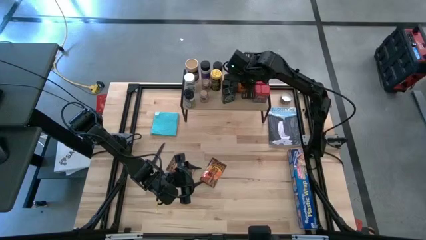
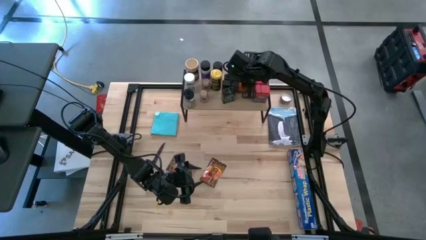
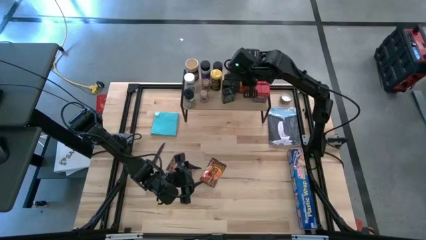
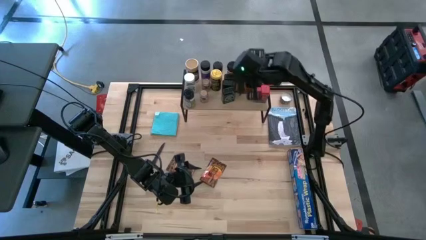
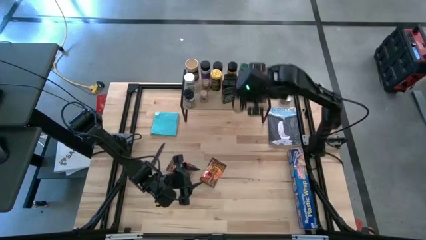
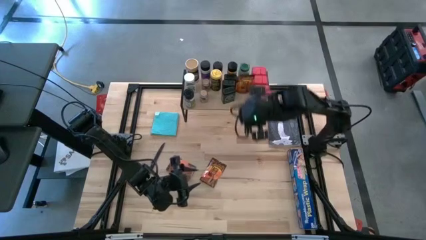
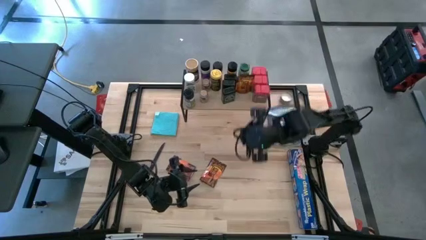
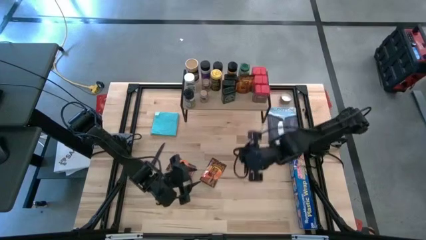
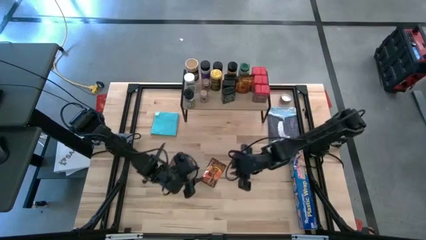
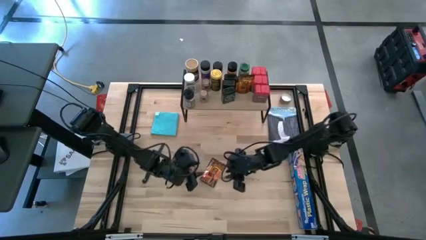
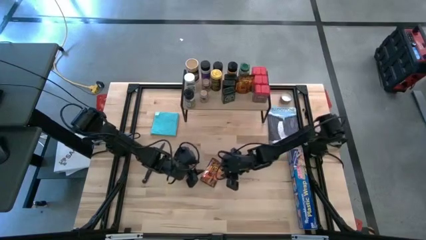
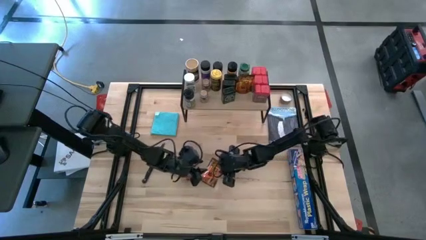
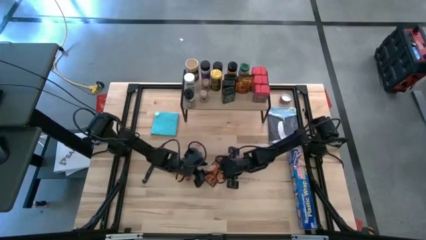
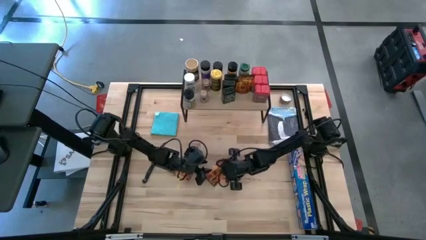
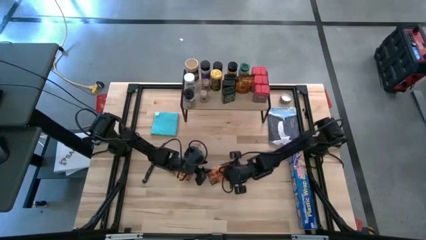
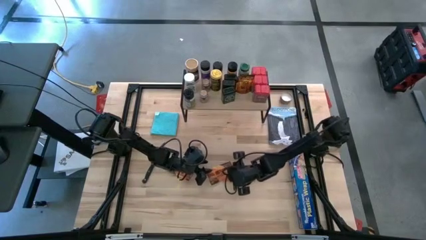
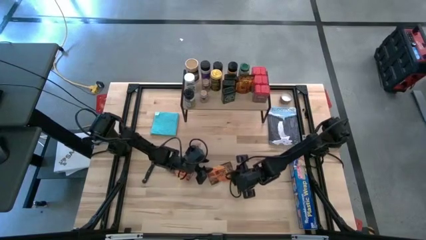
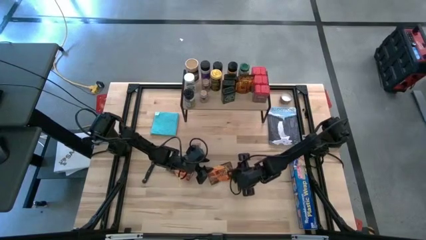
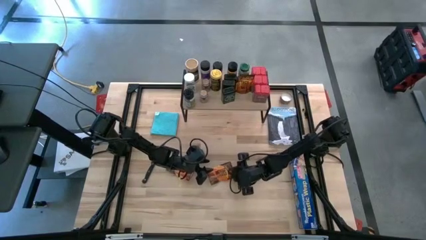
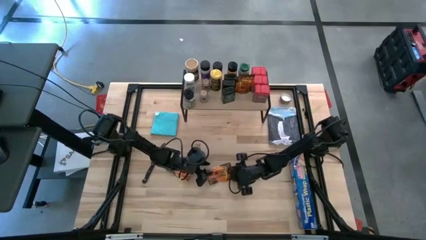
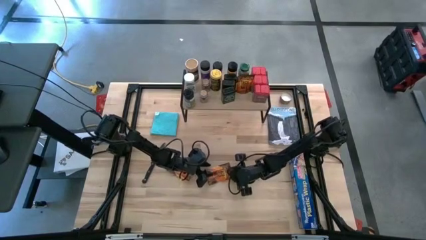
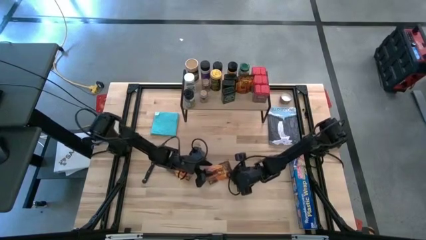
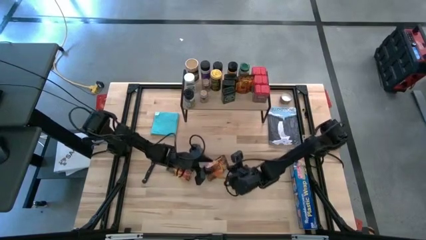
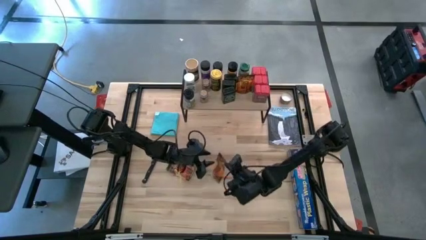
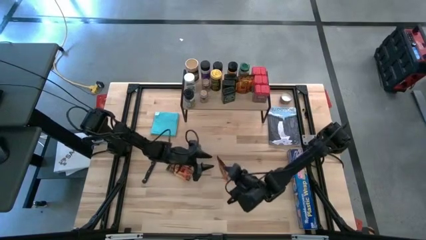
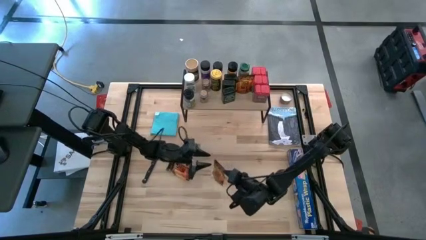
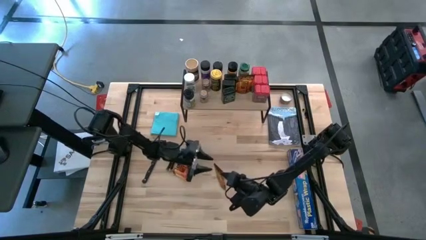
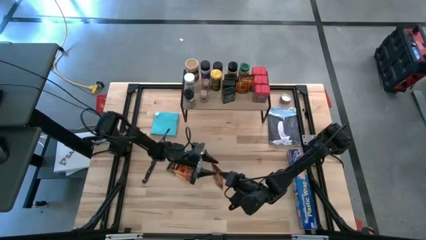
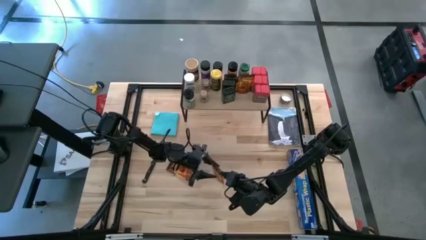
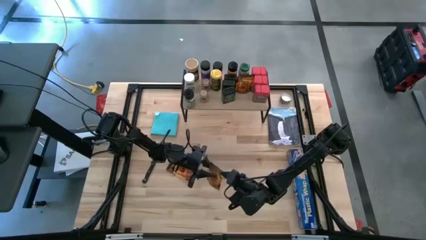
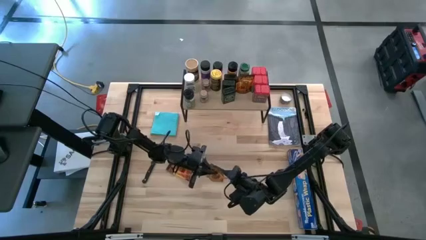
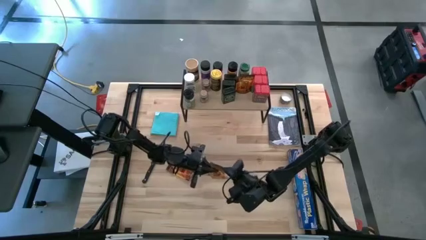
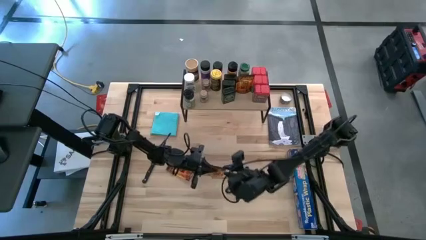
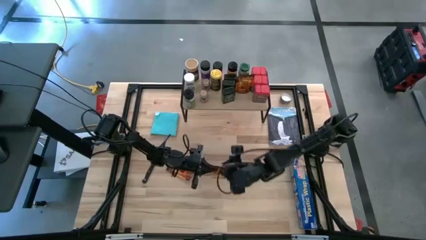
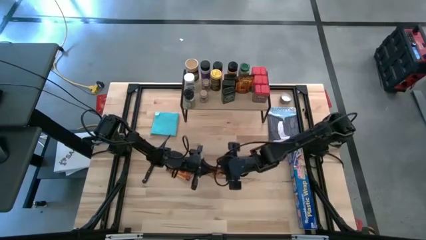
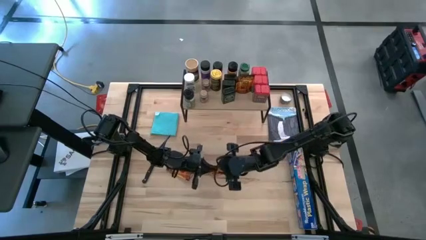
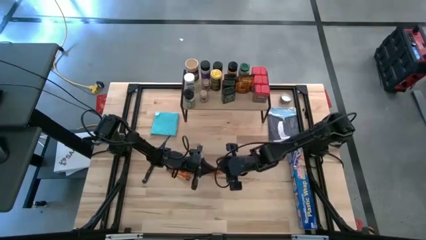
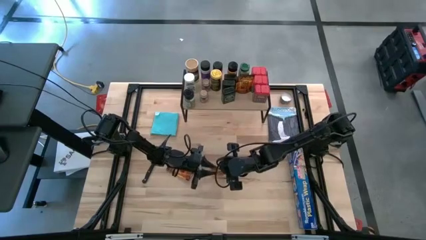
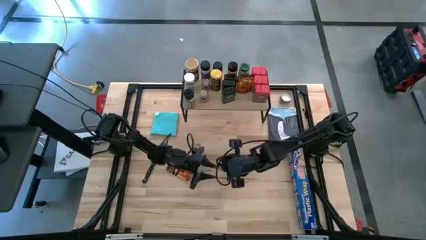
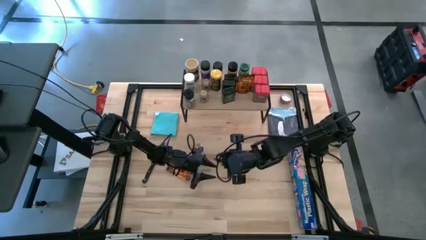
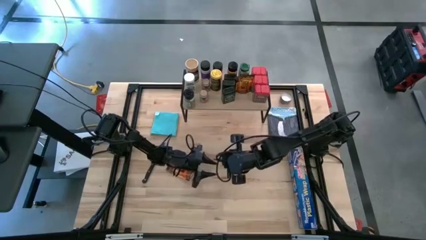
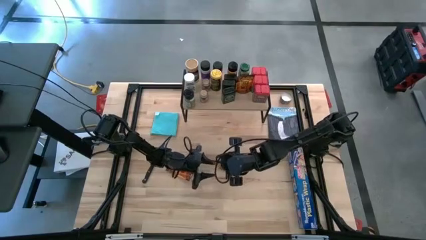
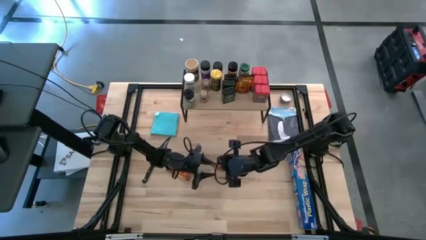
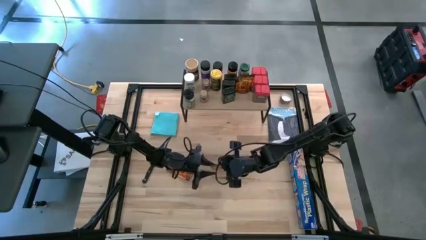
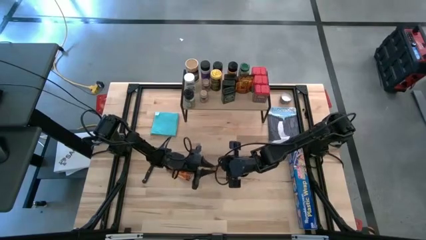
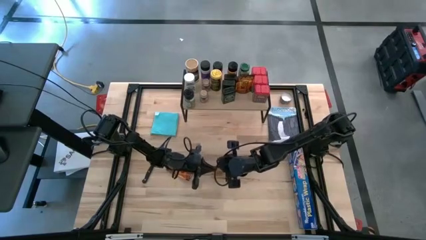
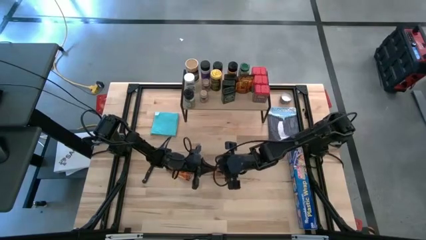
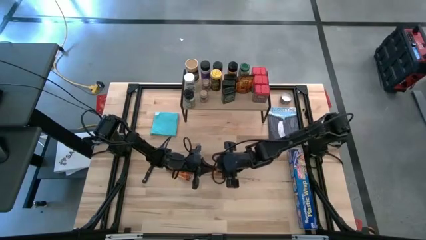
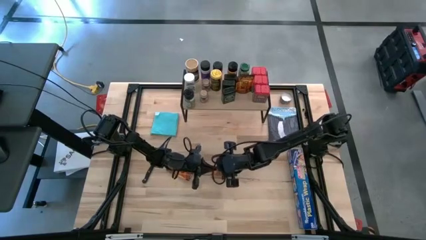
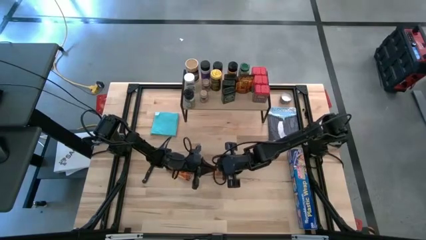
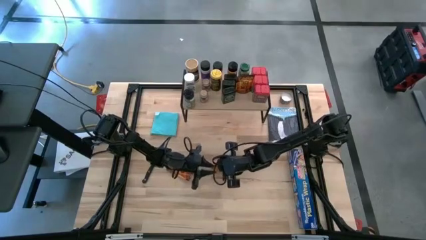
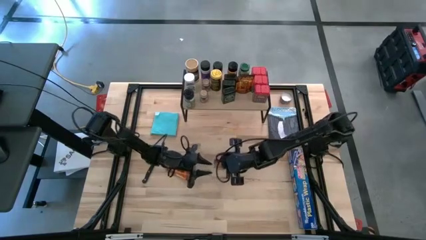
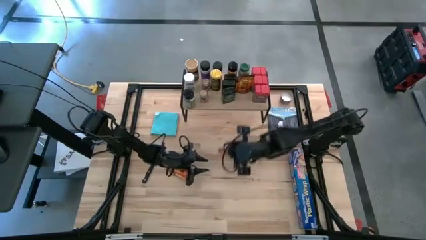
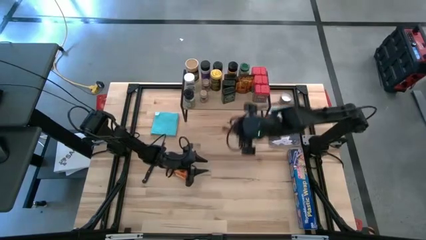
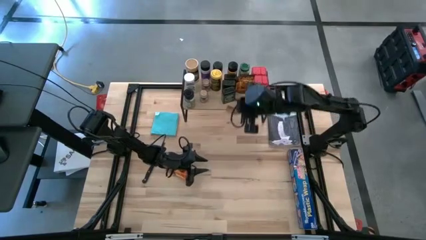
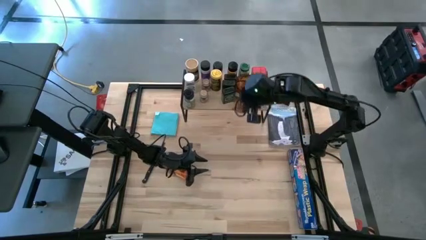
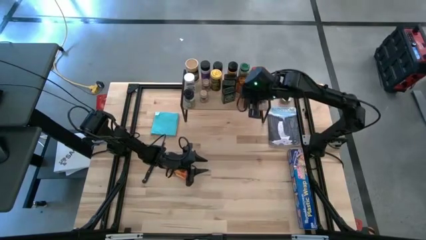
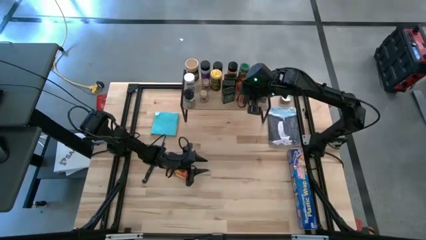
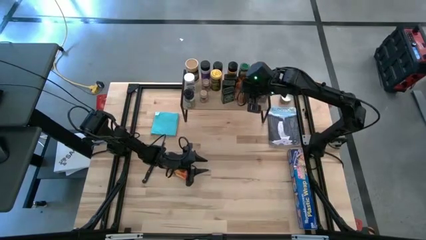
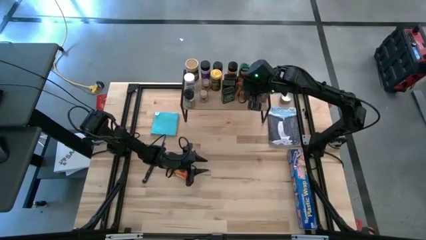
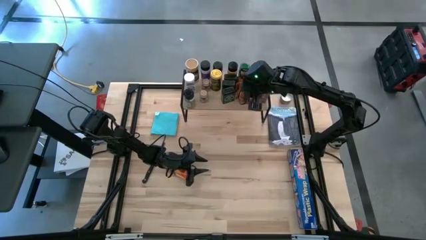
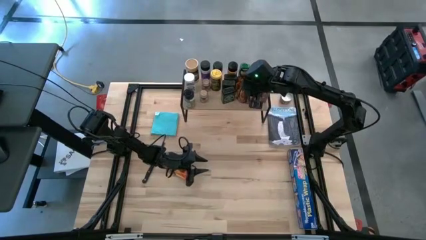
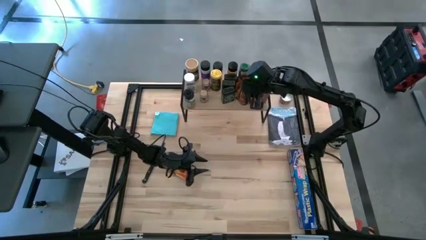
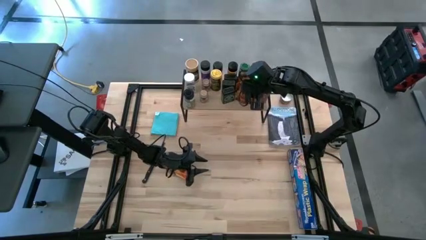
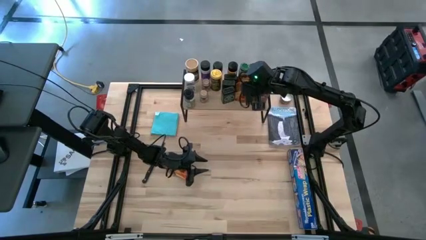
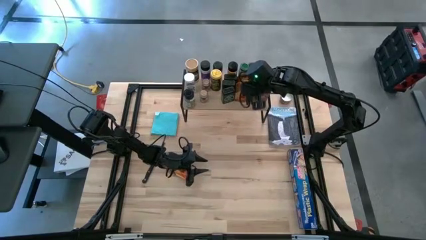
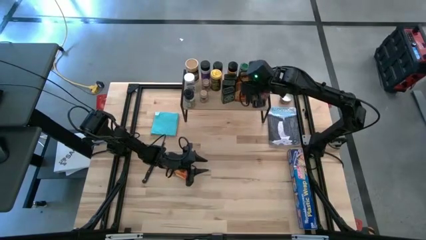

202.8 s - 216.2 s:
Task: Shelf spices
Put the orange seasoning bag on the shelf aligned with the other orange seasoning bag

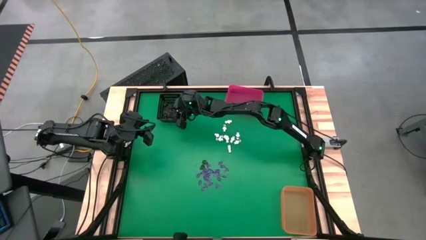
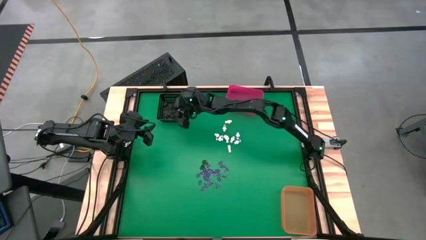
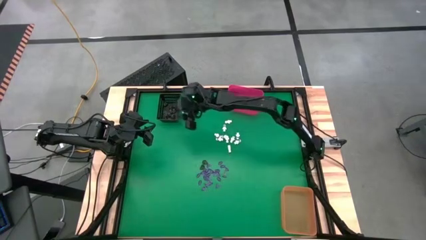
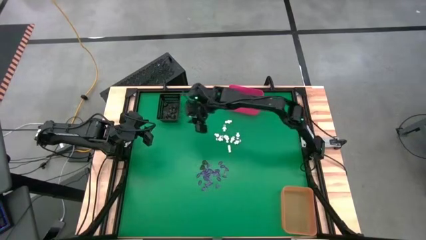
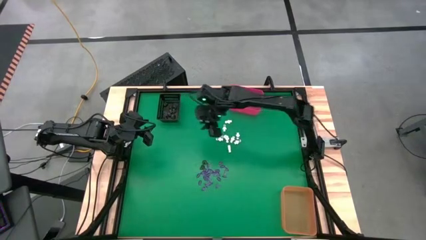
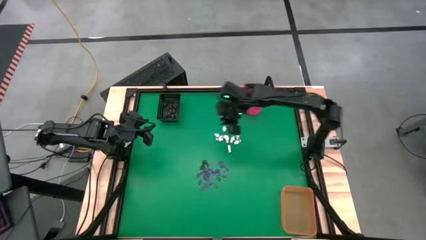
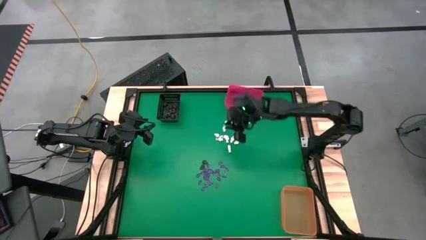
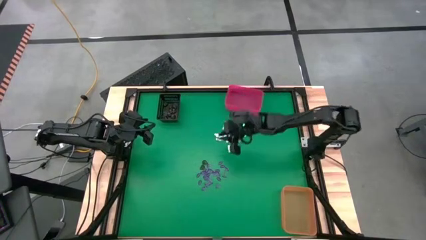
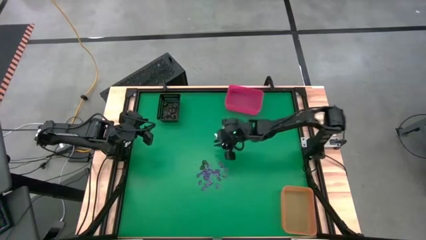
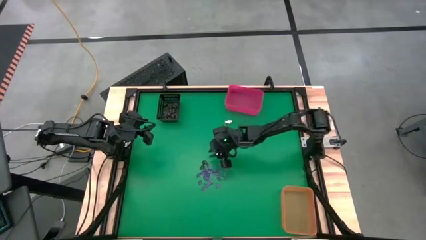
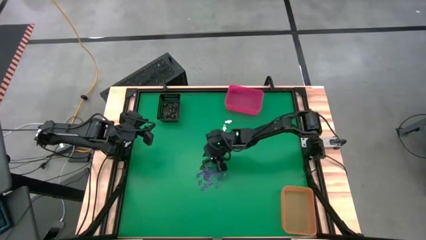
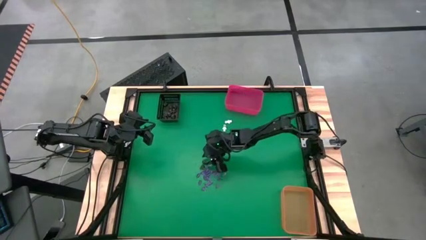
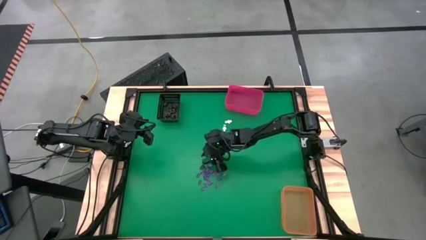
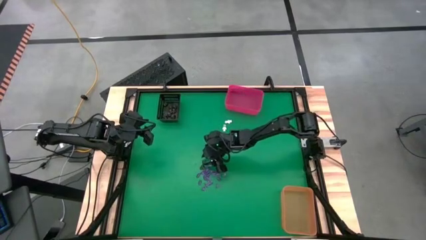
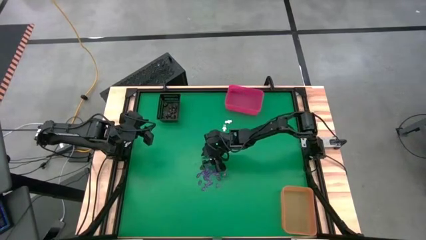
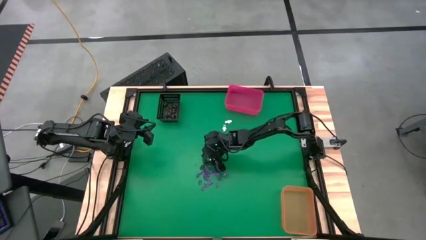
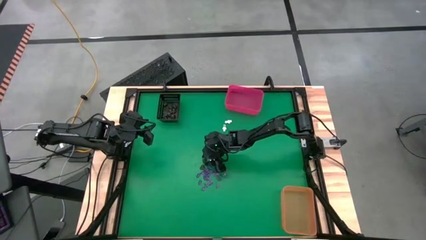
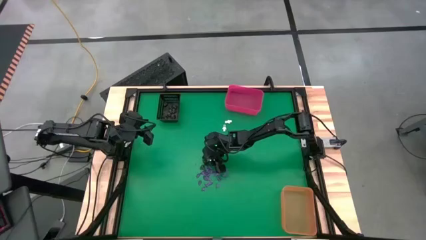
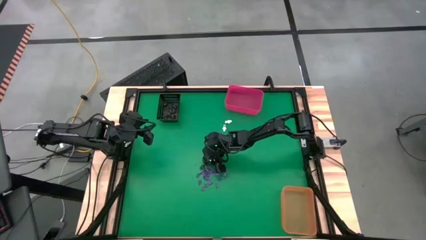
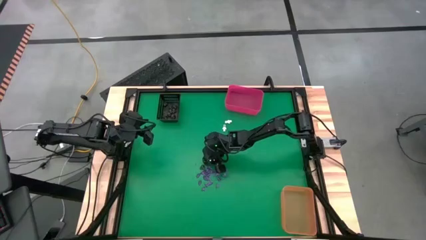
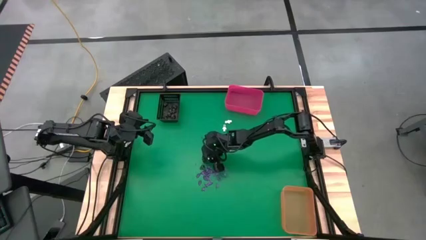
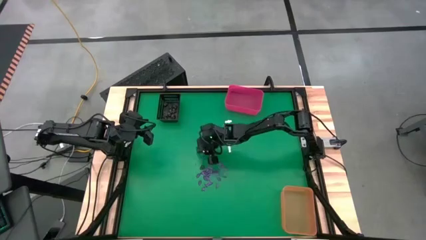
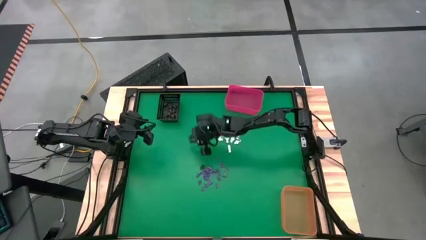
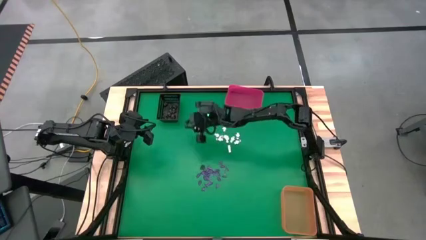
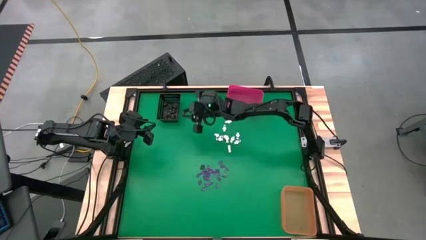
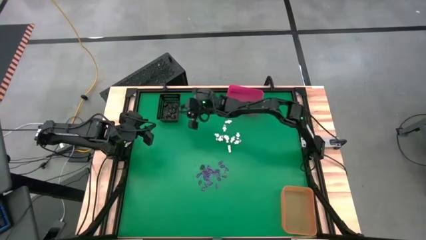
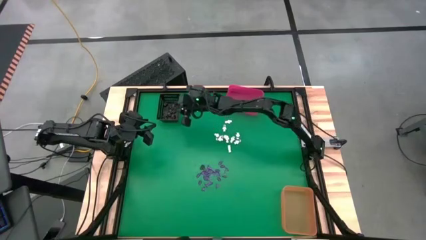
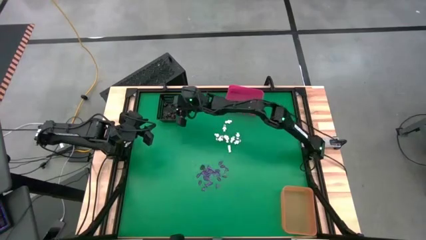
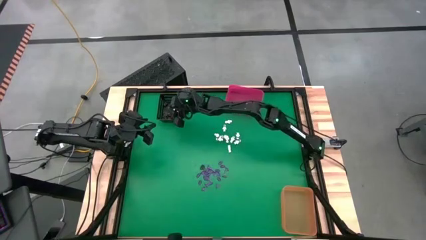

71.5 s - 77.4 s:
Task: Sort Halloween decoration
Put the brown skull toy into the black bin
